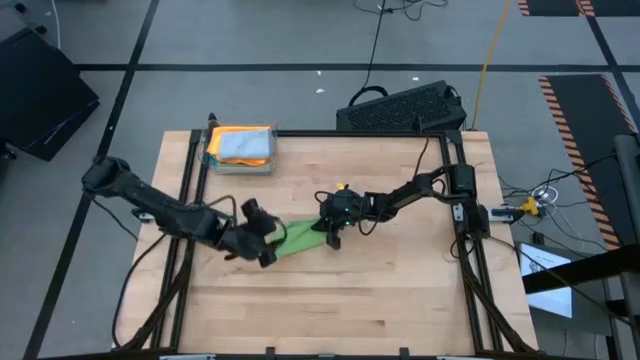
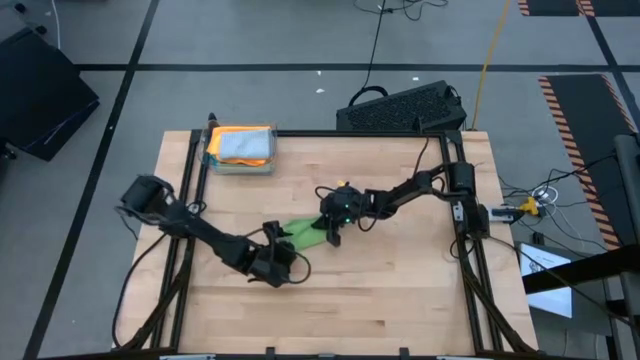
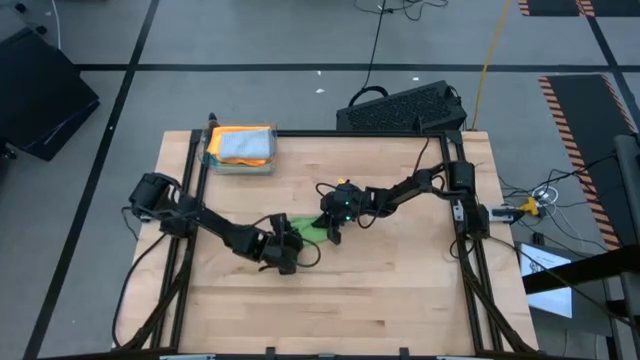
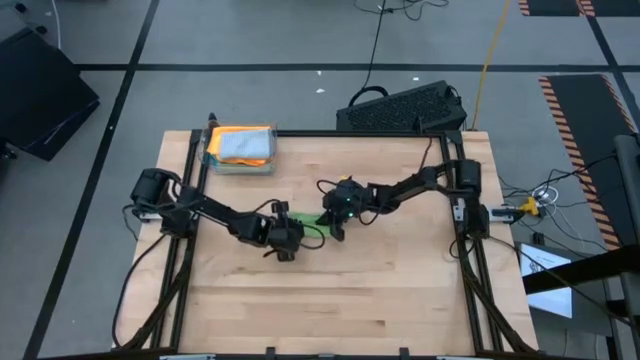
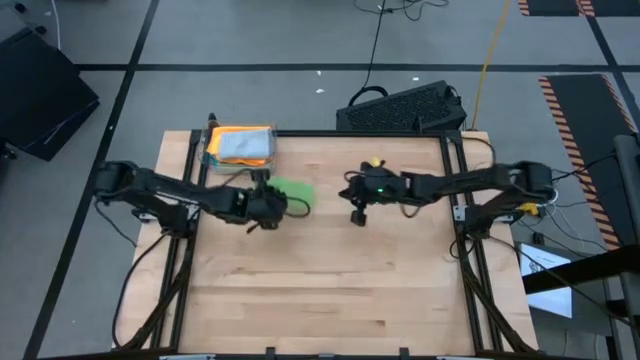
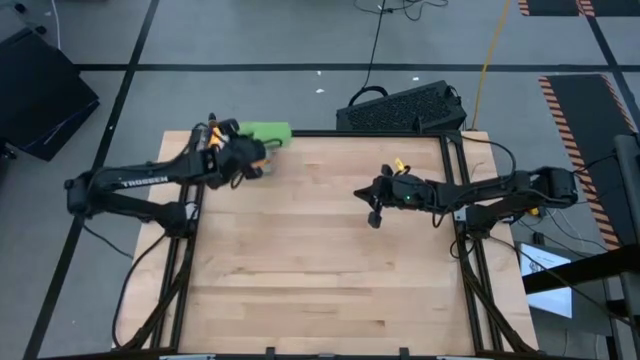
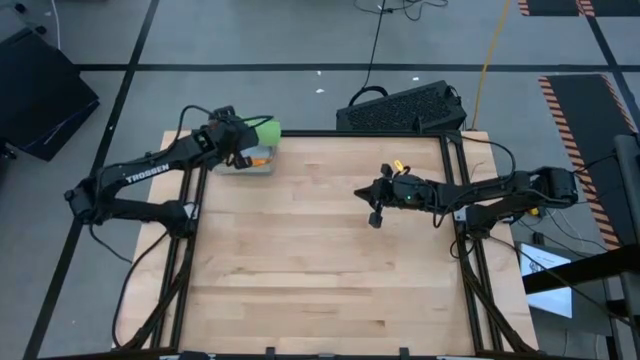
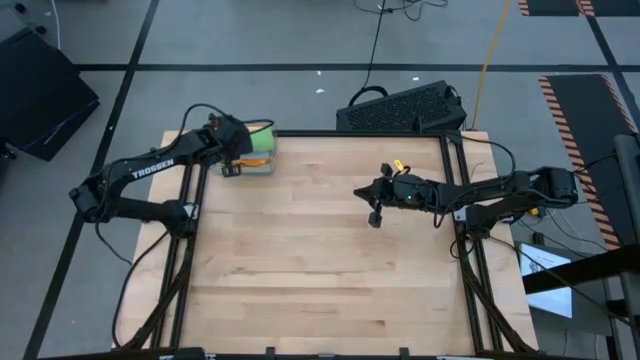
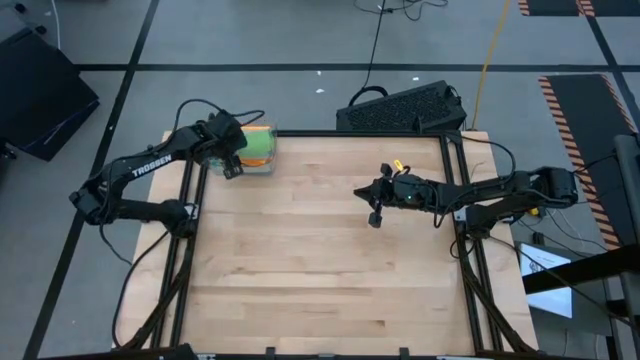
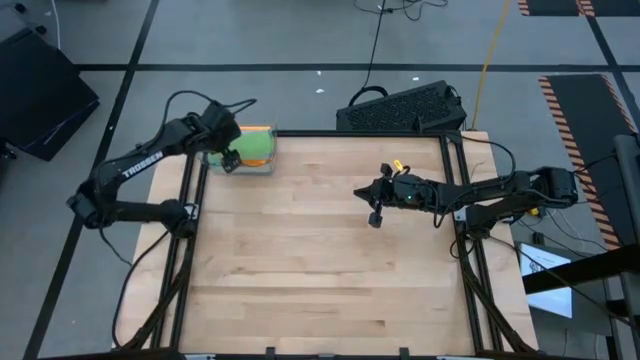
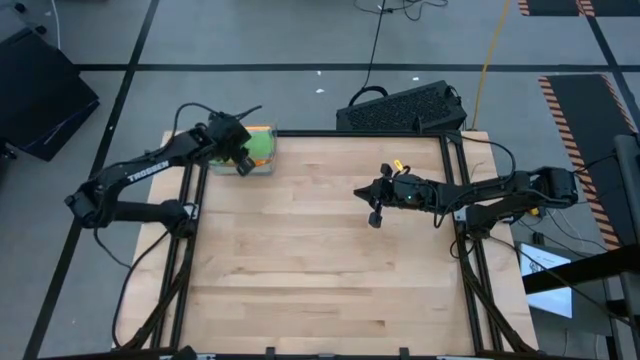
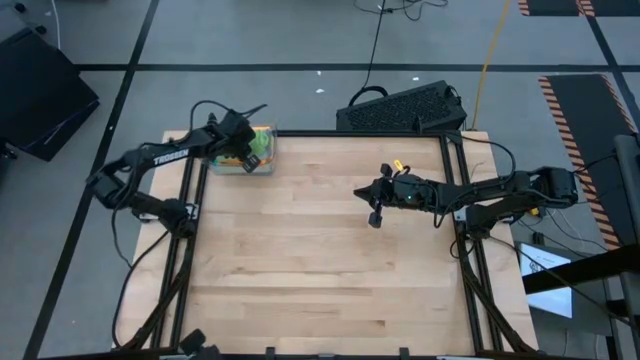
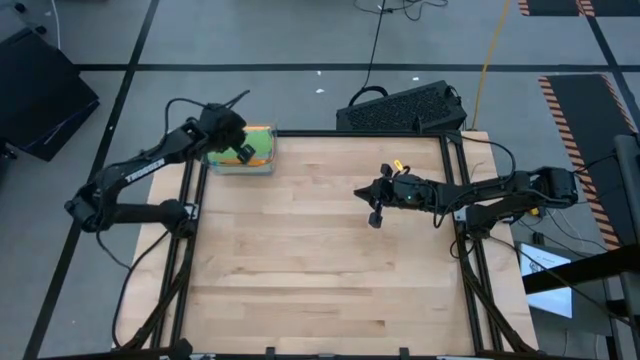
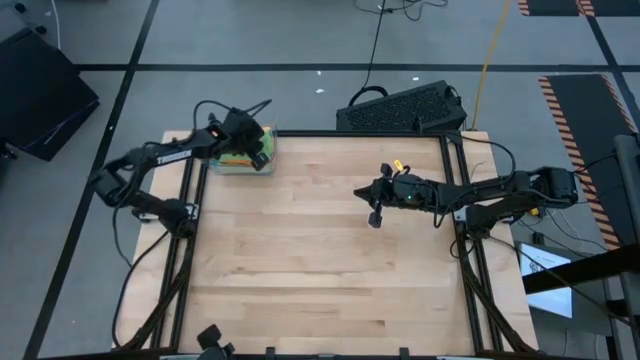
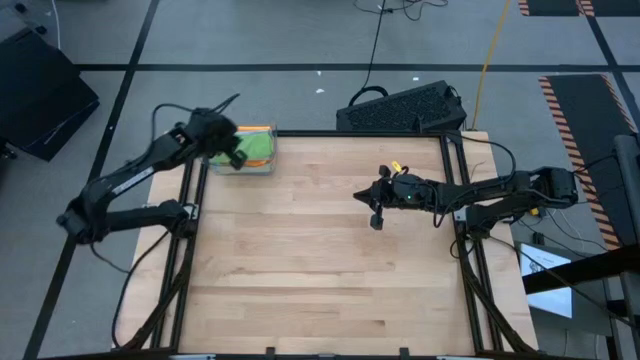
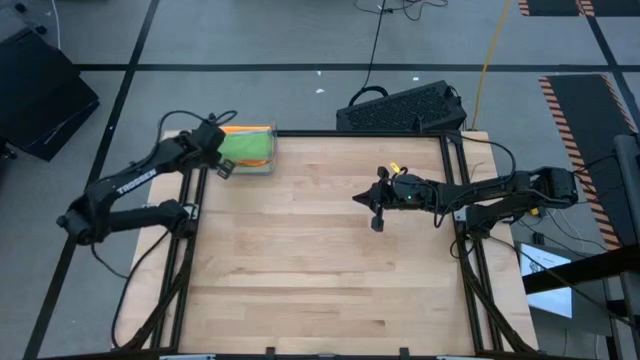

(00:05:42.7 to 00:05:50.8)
Task: Fold microfiber towels
Stack the green microfiber cloth on top of the gray microfiber cloth

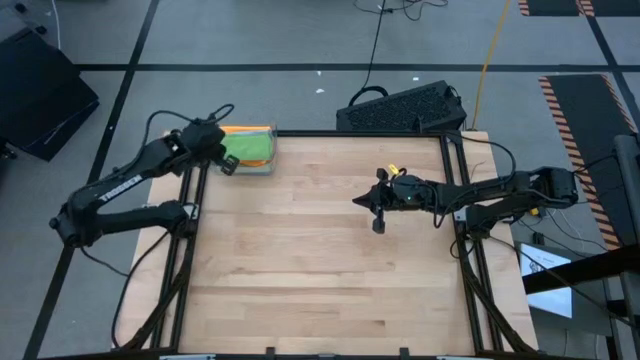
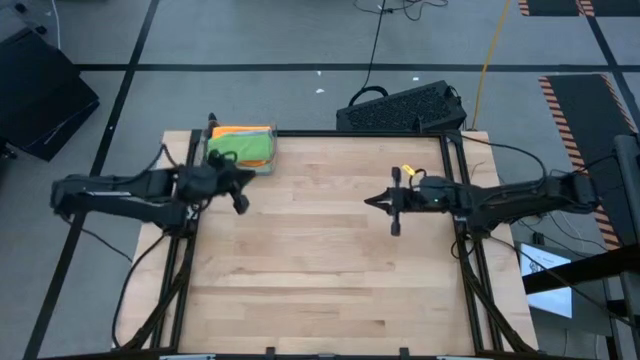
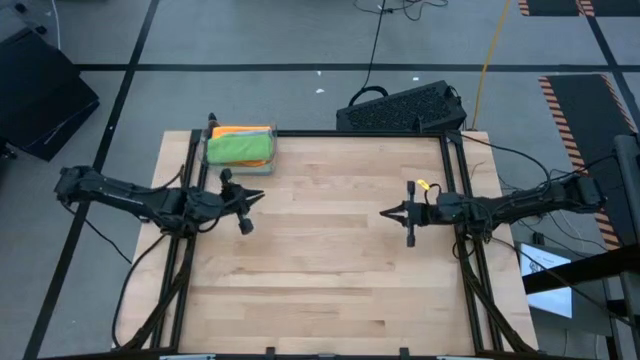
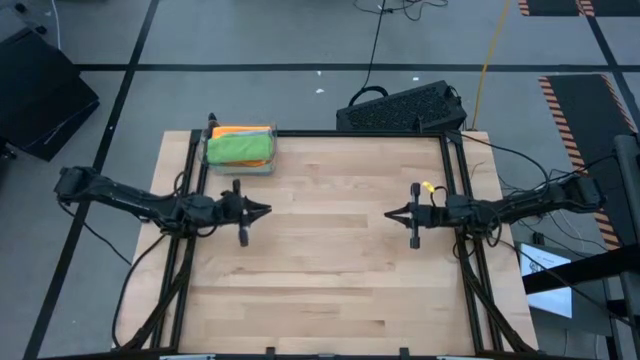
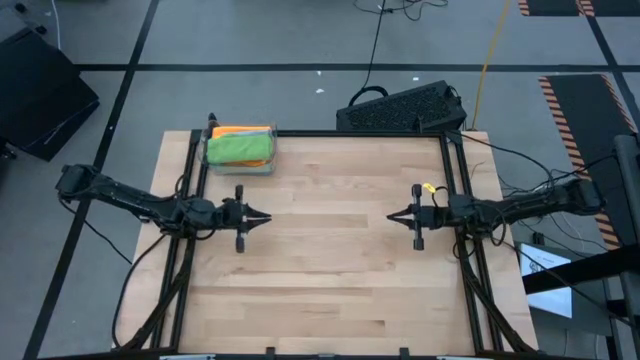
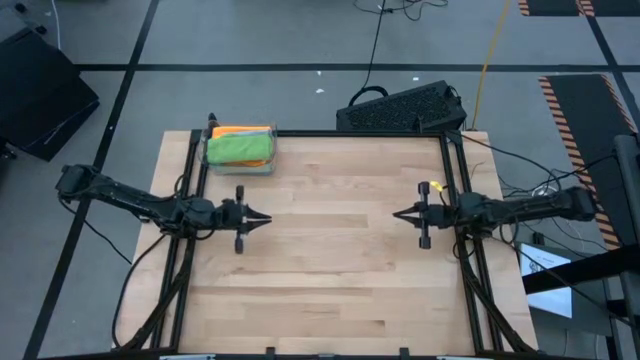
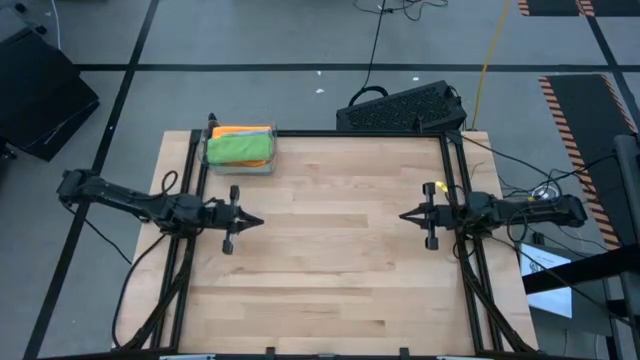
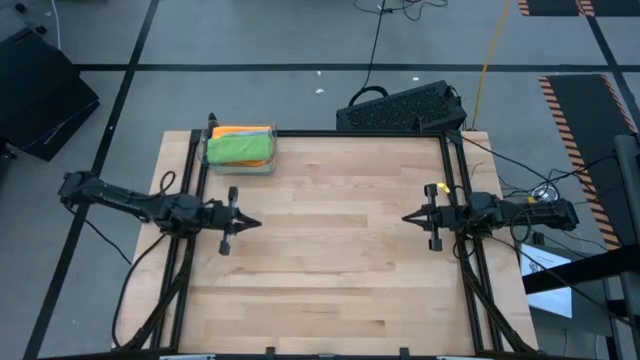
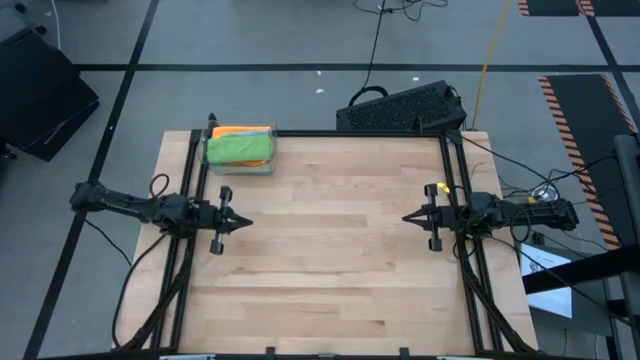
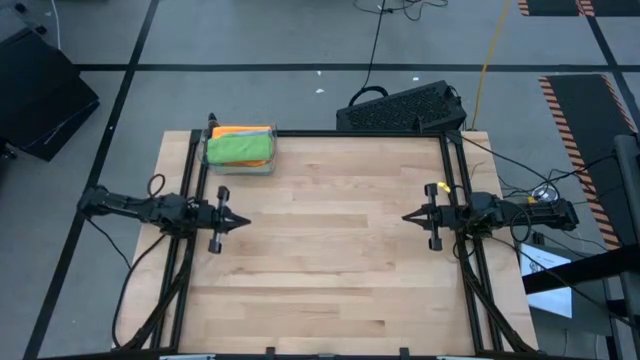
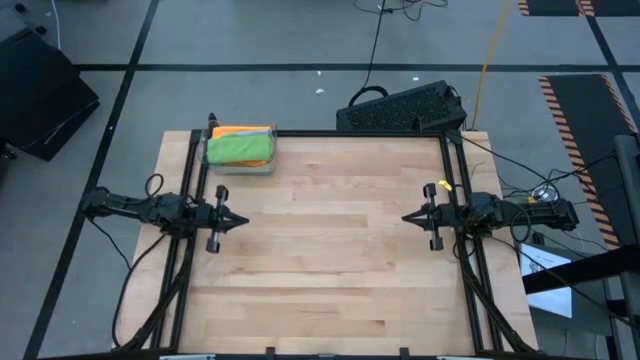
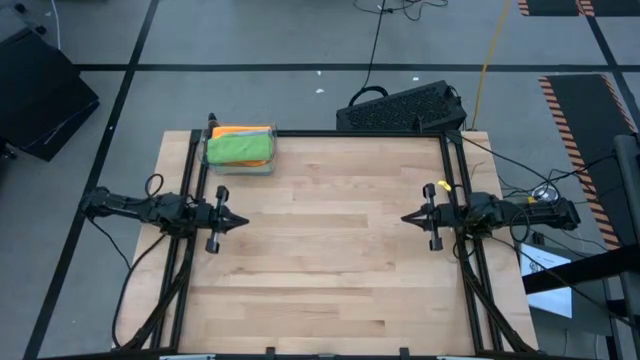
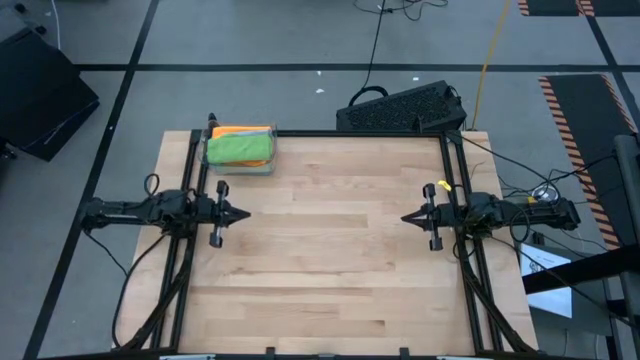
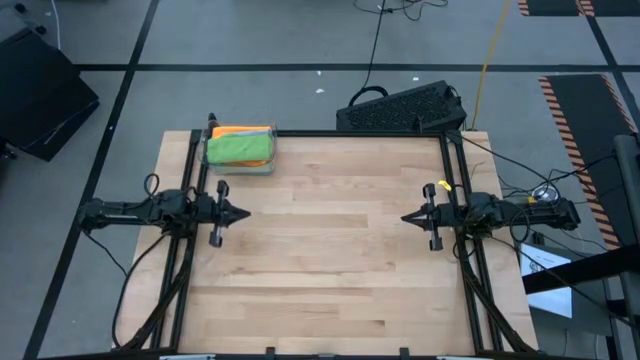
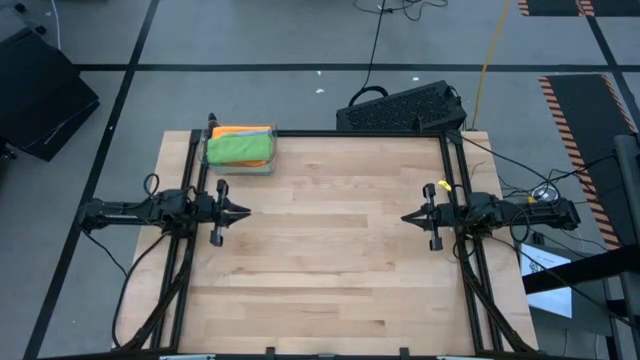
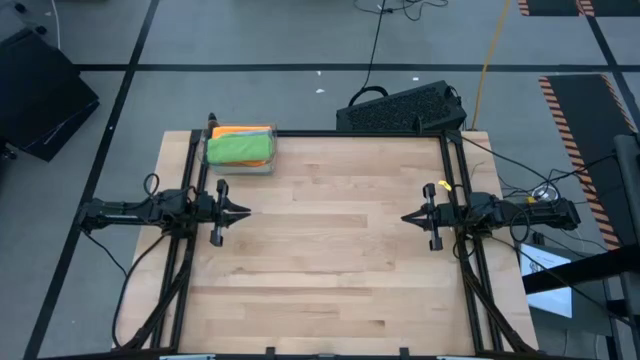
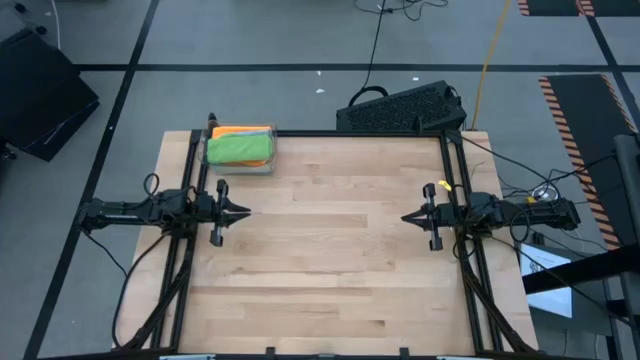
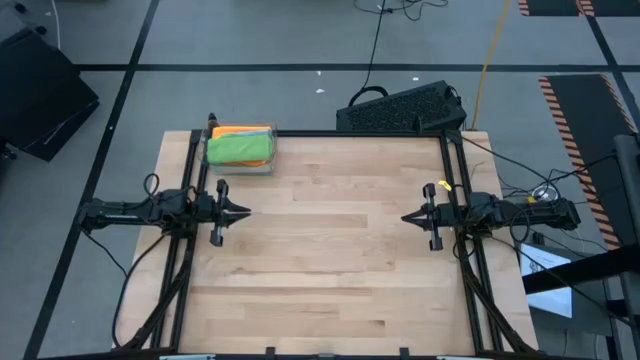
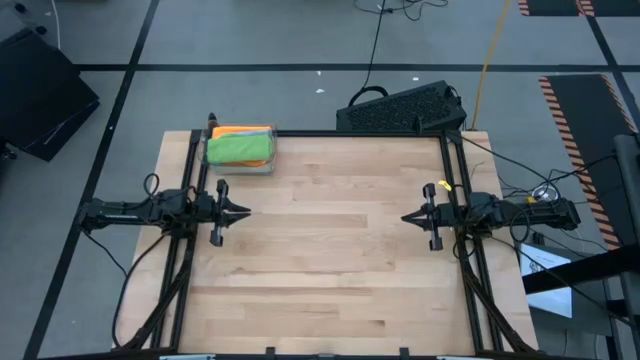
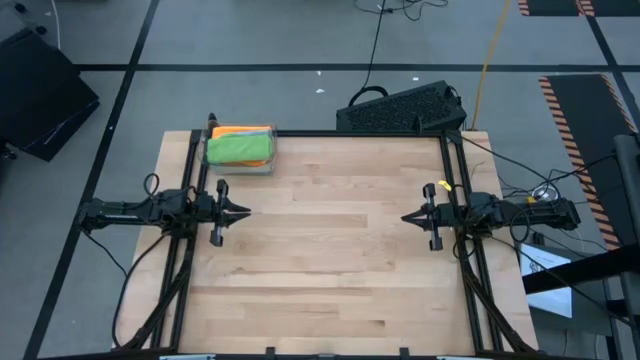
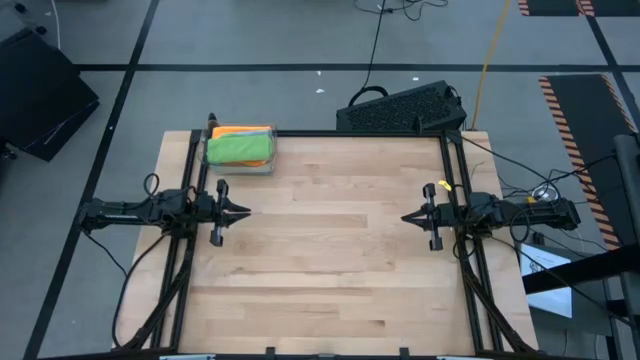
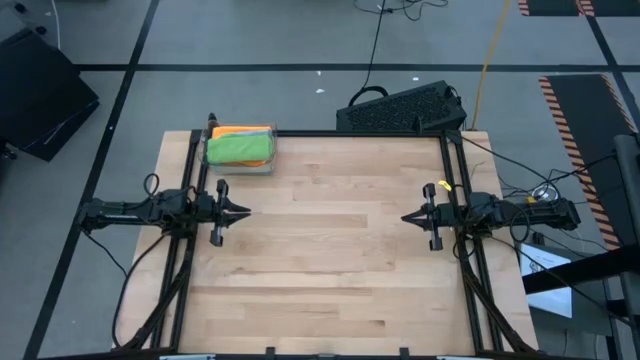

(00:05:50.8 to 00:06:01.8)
Return to Home Position

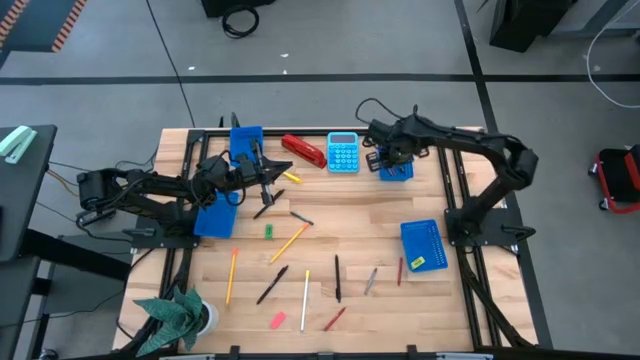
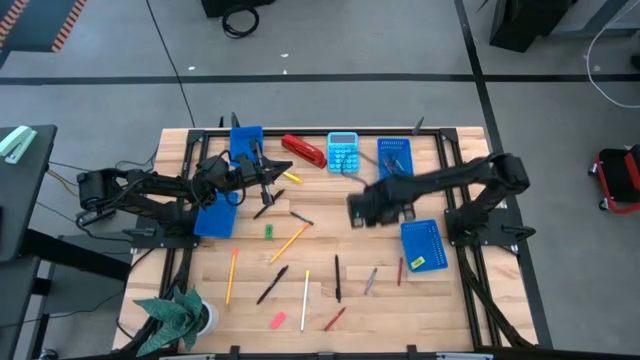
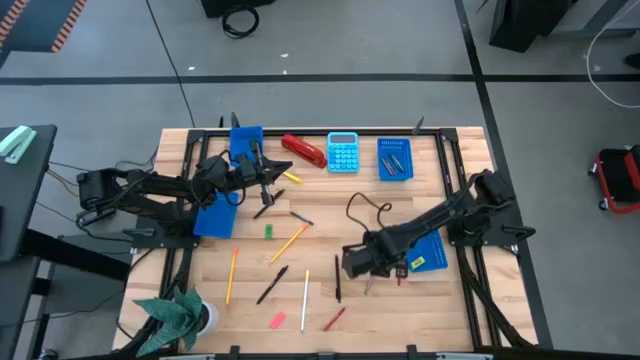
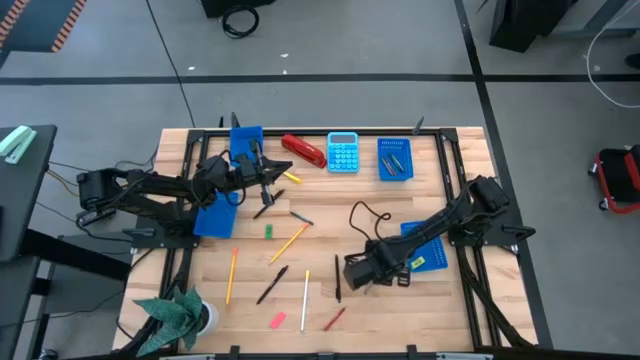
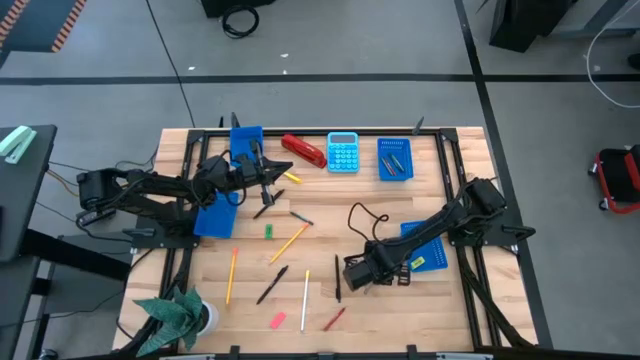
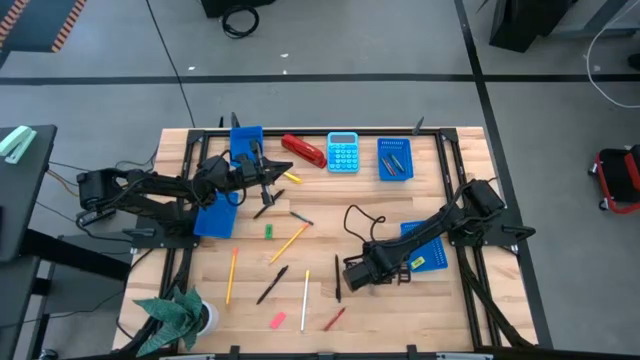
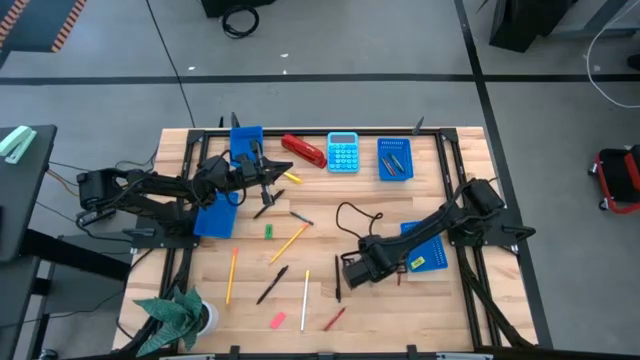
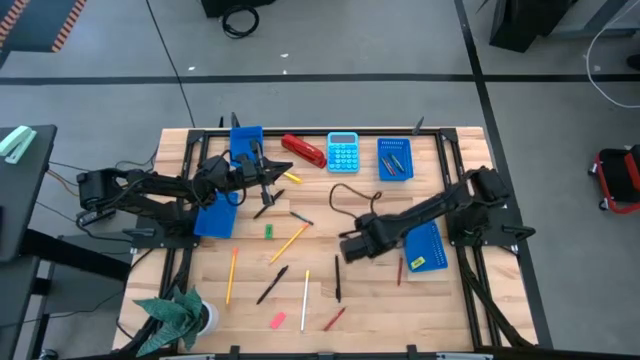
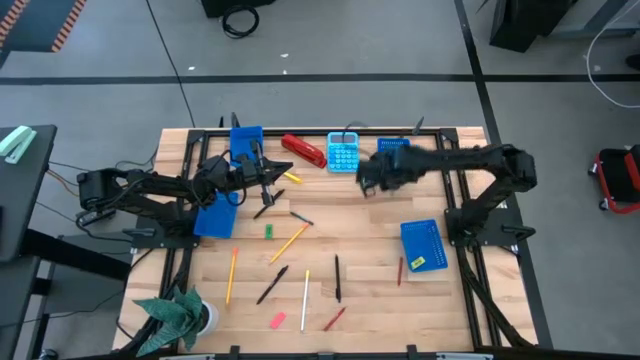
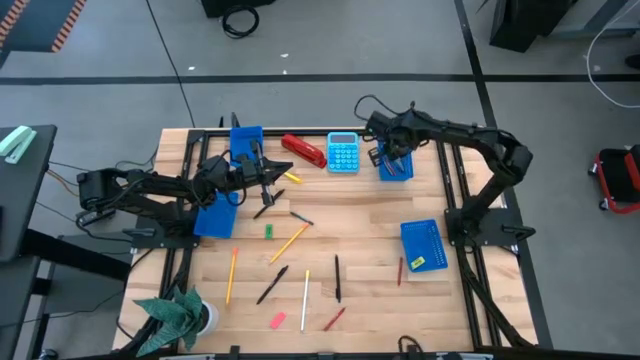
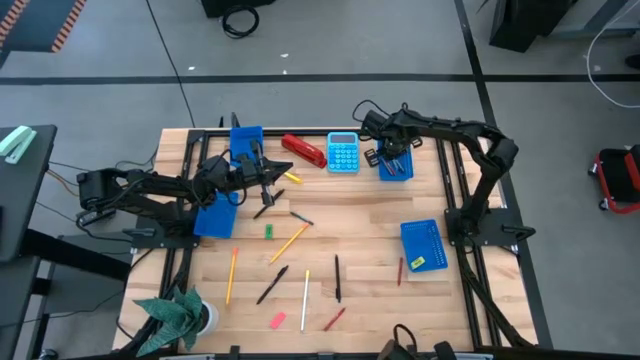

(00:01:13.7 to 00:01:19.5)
Task: Sort crayons/erasers/pens/pencils in bins
Put the gray crayon into the top right bin
